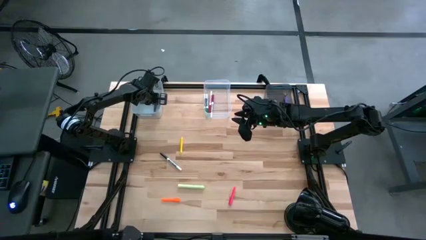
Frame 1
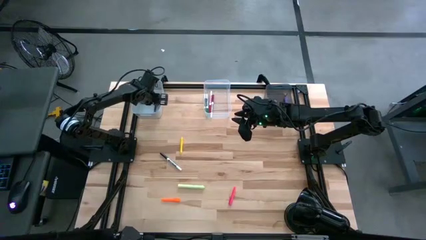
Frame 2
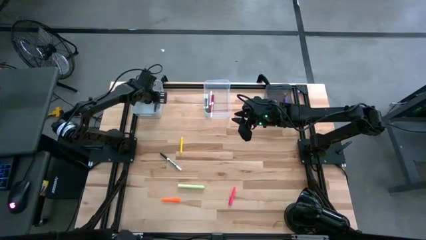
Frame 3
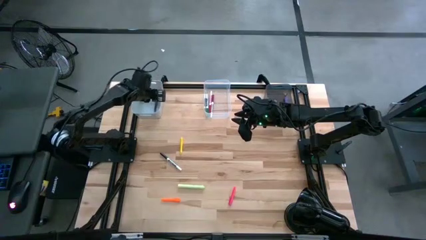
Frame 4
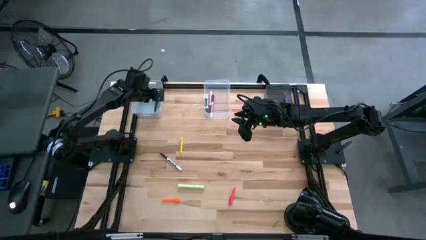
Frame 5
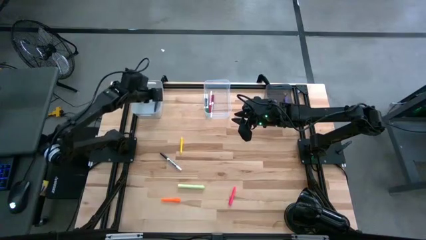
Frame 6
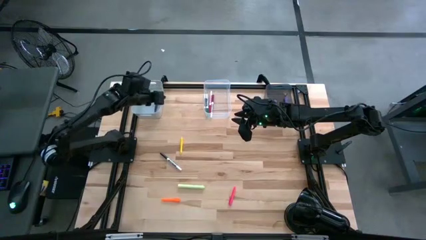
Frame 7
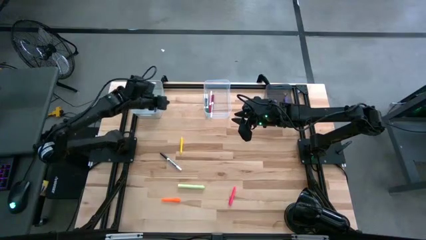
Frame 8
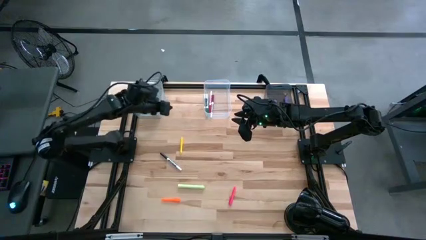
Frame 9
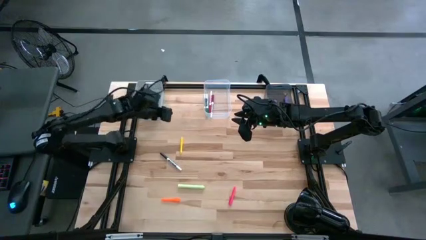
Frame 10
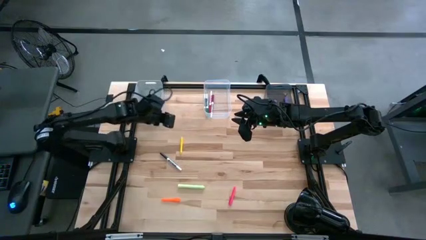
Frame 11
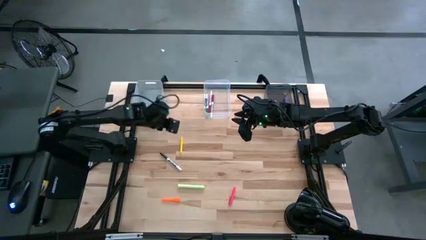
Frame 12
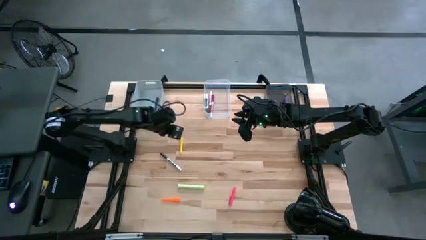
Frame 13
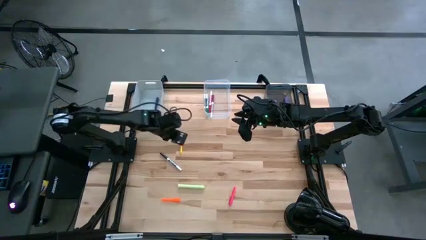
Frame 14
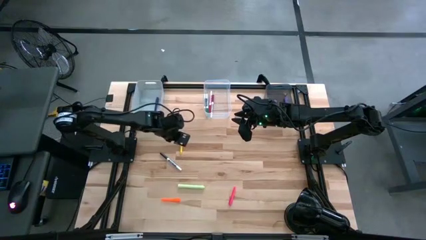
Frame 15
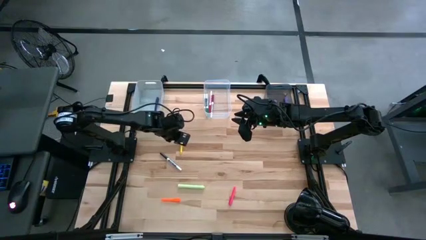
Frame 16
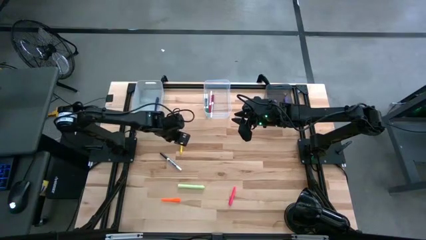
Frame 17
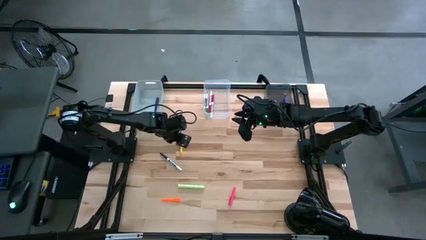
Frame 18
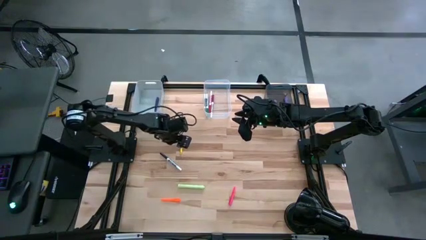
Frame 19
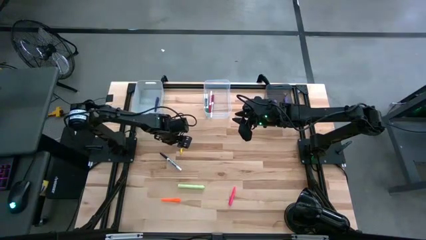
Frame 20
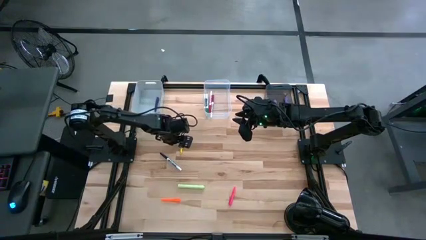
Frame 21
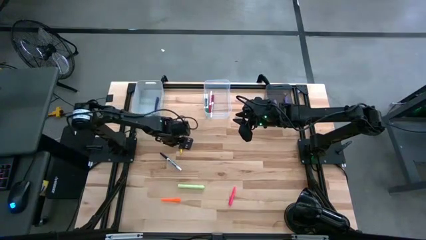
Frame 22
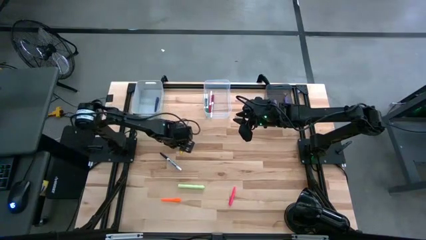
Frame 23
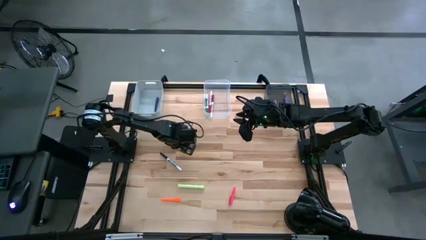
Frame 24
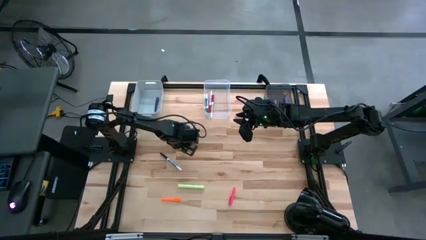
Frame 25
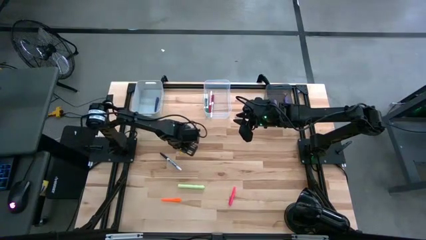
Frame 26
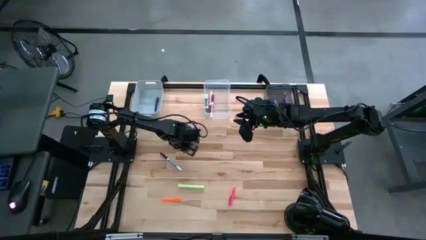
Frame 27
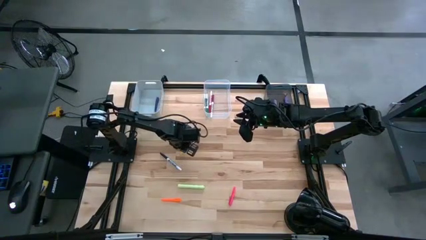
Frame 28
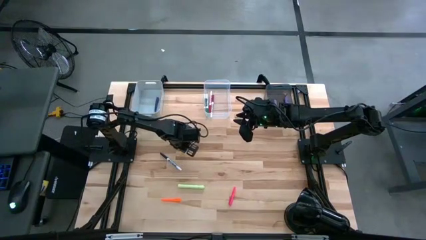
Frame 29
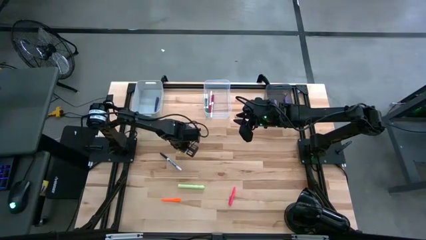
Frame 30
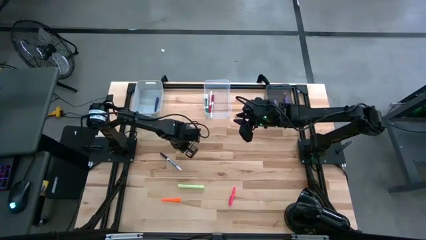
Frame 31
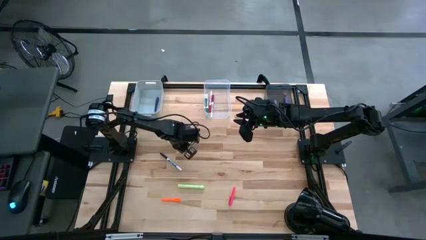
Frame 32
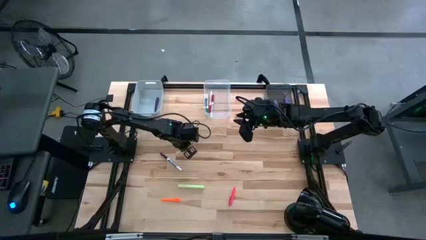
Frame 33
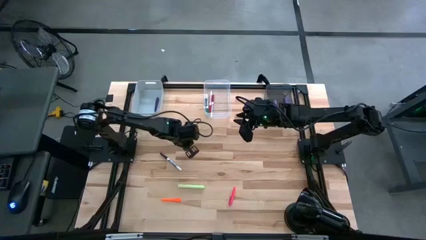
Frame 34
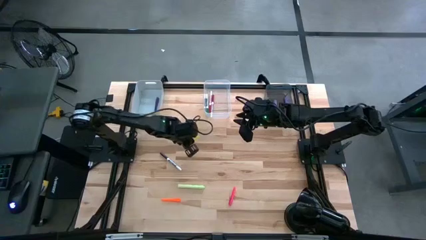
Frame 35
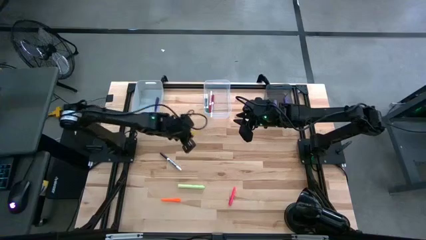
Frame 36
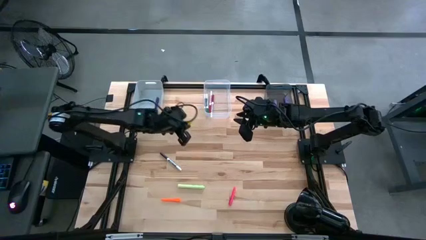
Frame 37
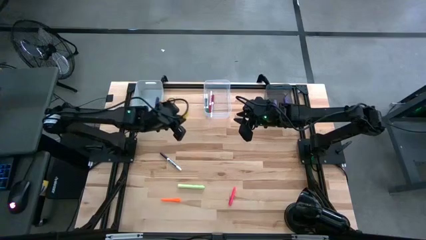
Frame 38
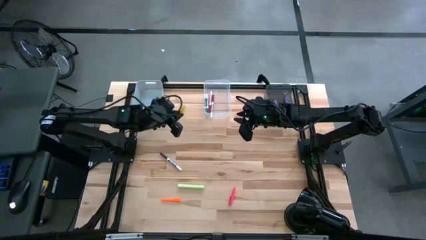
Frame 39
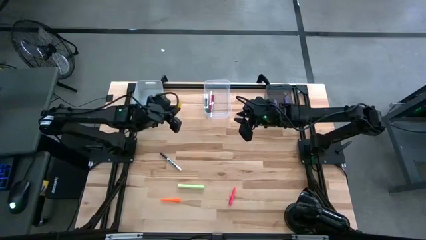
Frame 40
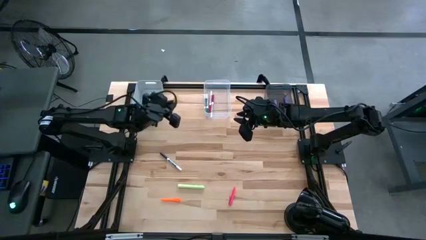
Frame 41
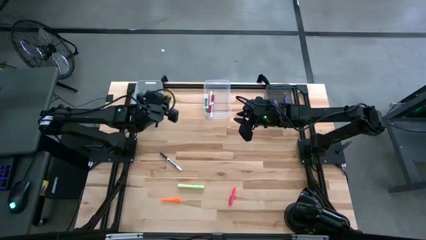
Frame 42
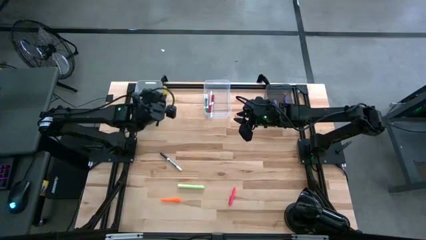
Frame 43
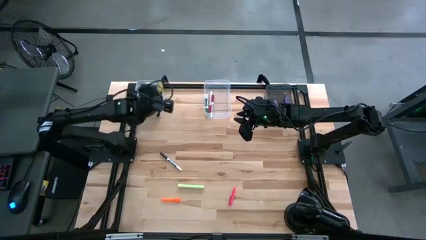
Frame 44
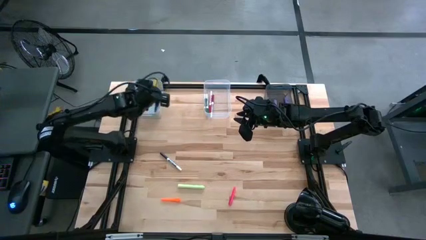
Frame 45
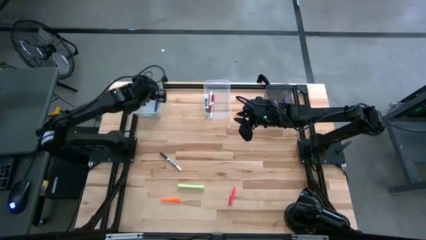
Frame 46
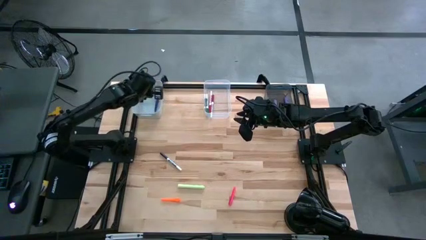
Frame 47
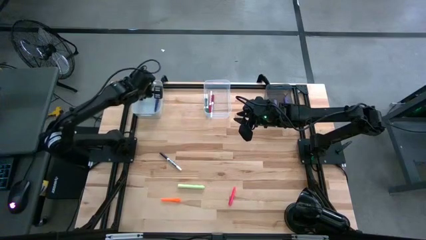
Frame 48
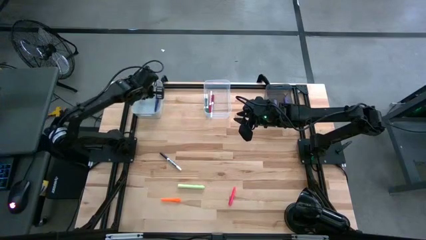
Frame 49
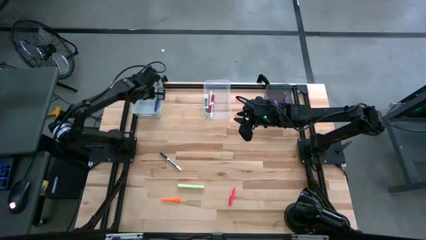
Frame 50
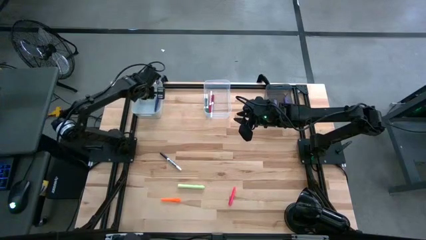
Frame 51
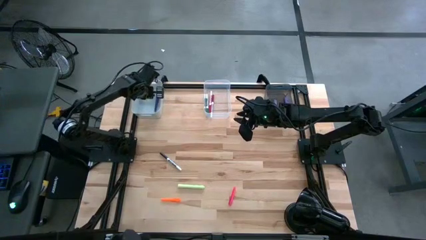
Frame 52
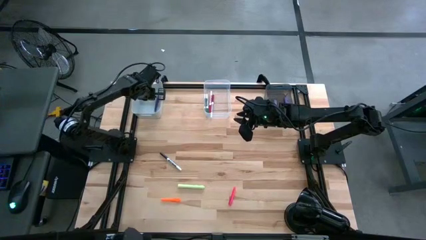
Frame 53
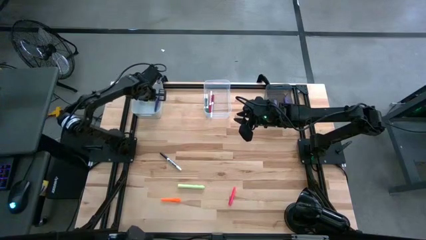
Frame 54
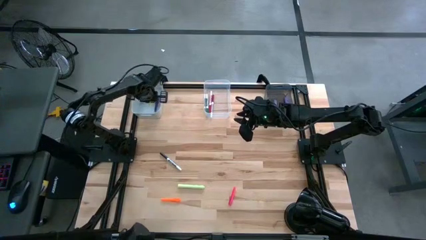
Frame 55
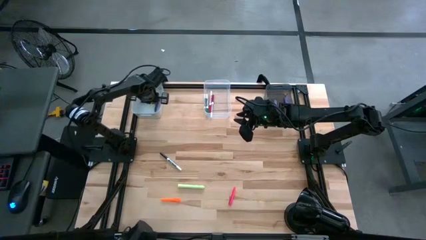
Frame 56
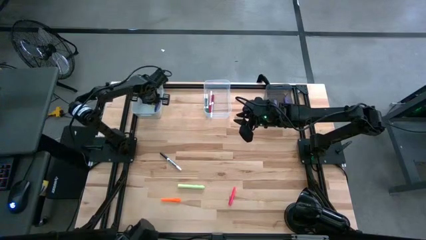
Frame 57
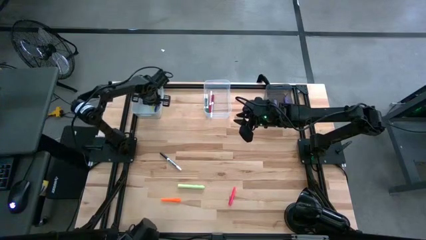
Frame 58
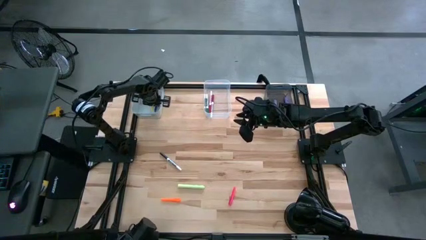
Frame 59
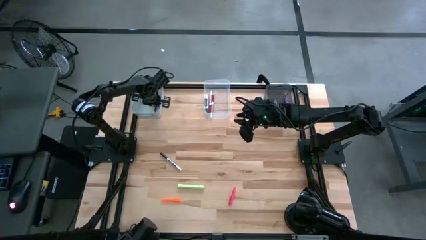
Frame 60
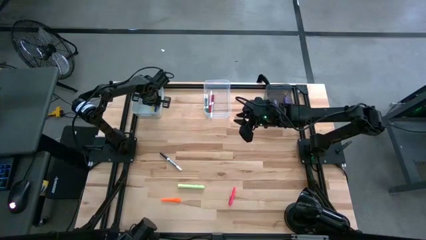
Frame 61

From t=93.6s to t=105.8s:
Task: Pick & Place Markers
Put the yellow pen into the gray bin

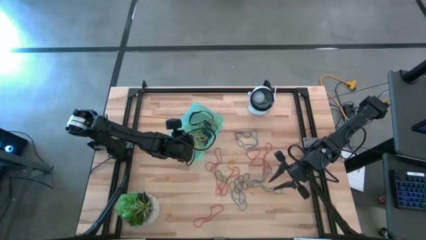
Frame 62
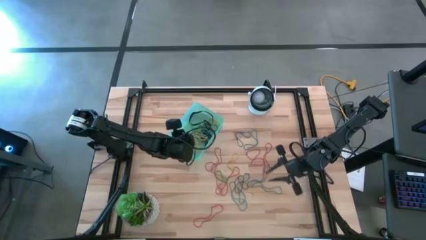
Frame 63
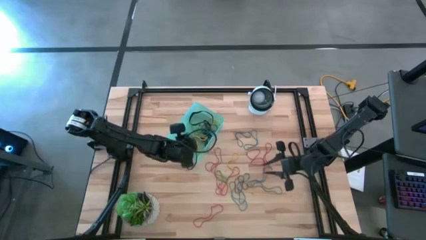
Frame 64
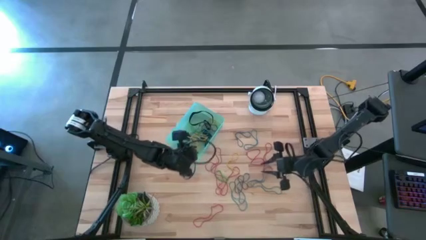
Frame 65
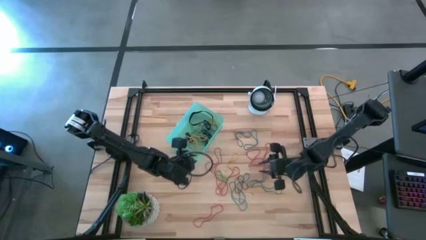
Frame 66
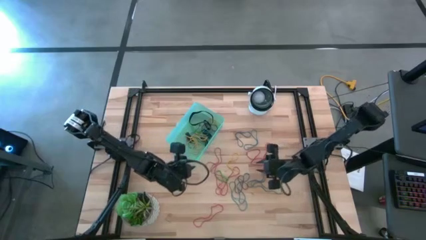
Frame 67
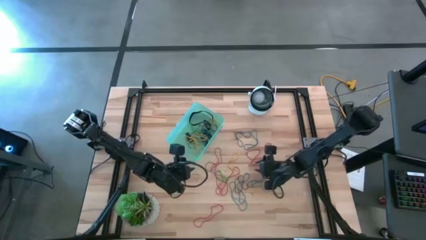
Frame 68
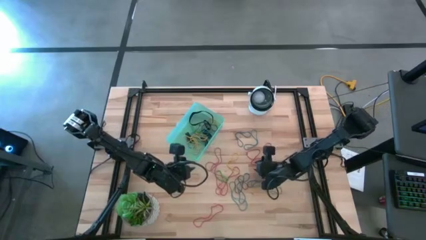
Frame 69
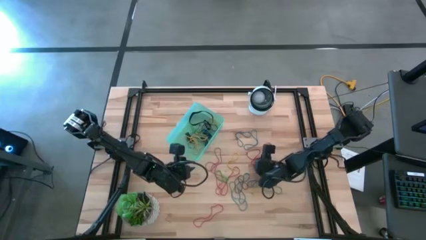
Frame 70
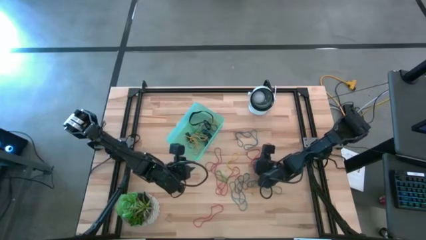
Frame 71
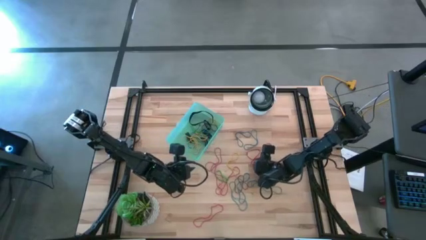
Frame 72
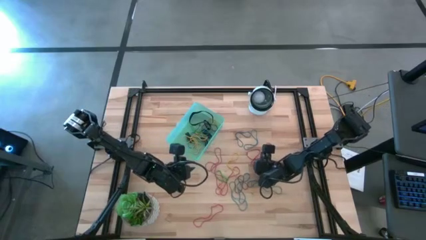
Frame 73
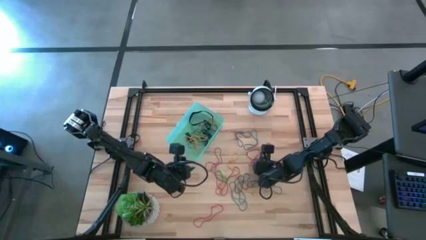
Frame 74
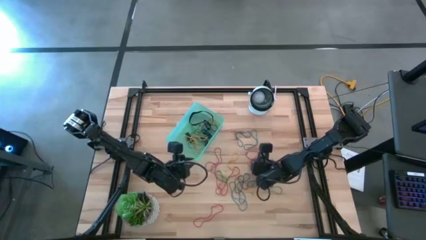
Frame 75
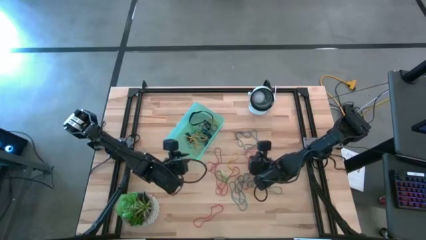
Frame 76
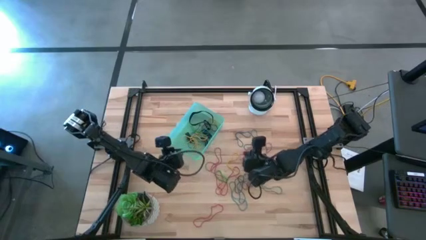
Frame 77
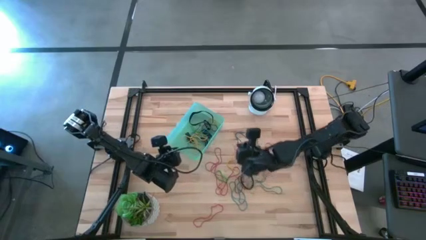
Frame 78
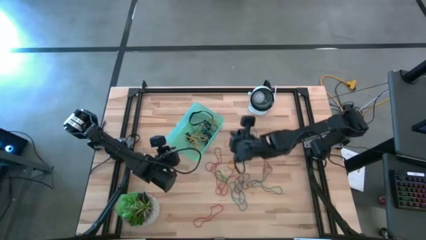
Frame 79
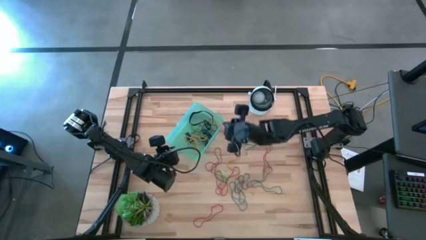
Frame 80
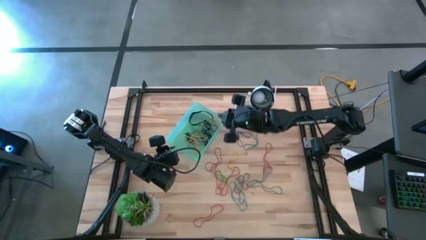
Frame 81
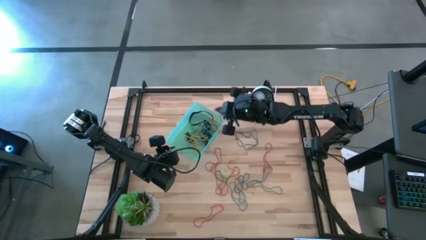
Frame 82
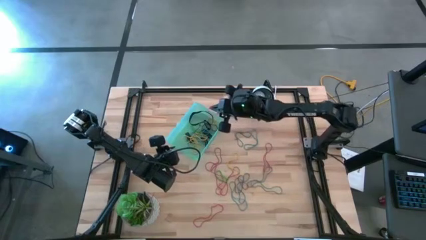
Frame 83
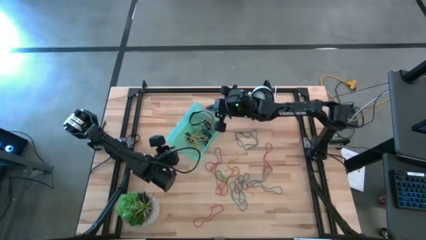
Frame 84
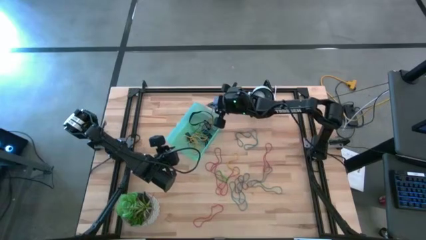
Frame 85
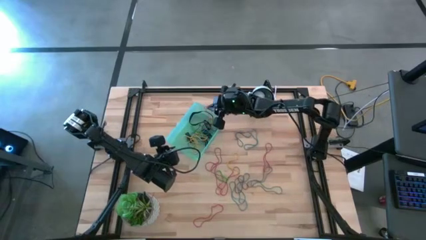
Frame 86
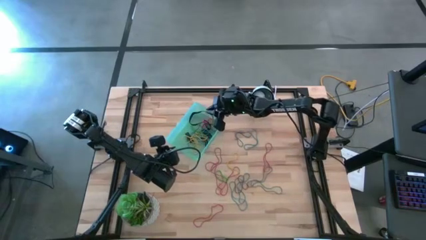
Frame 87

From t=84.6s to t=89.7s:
Task: Pick and place rubber bands into bin
Put the red rubber band into the green bin
